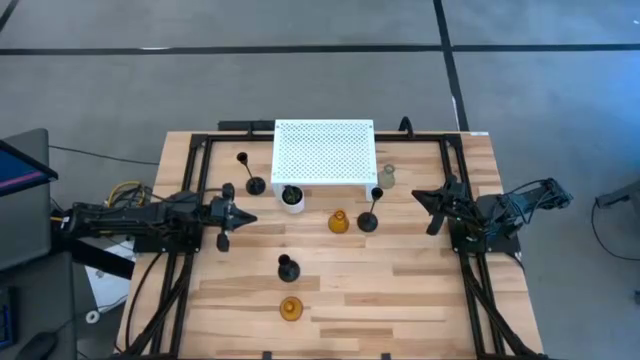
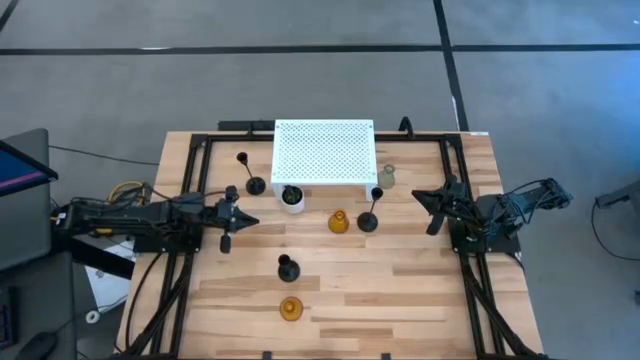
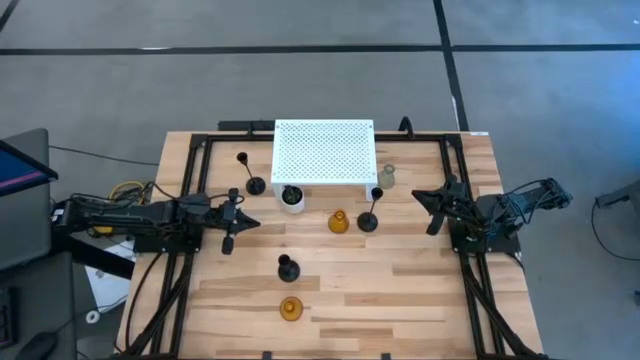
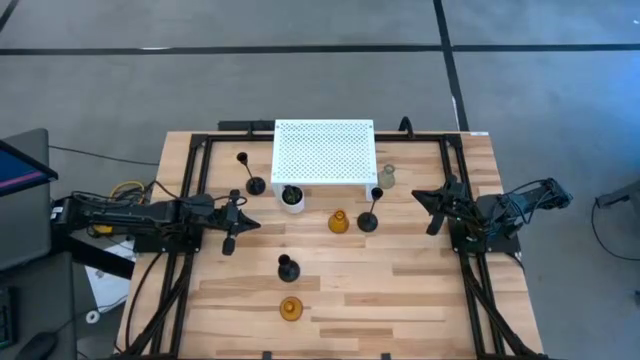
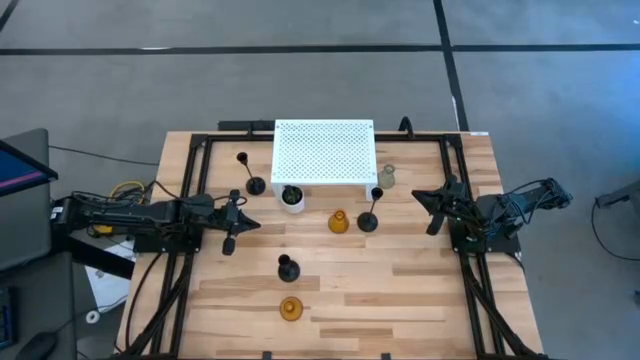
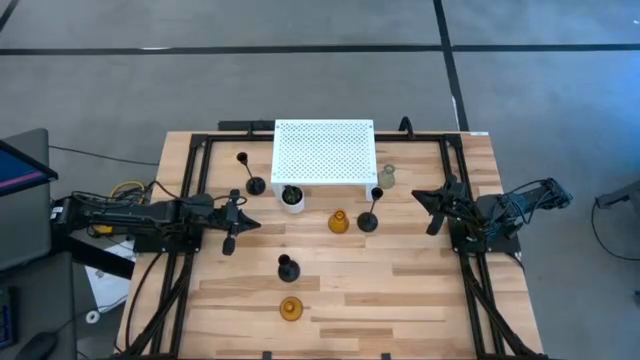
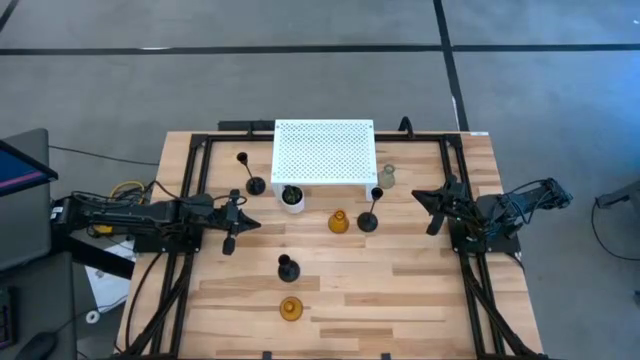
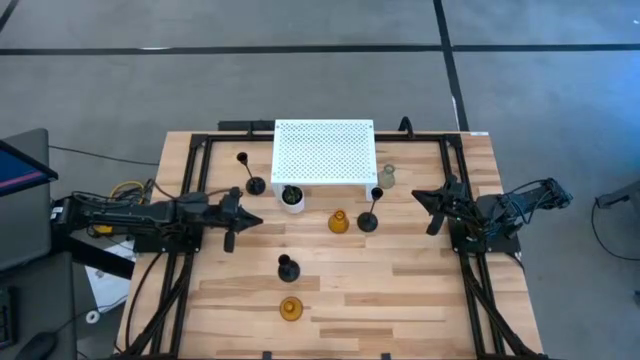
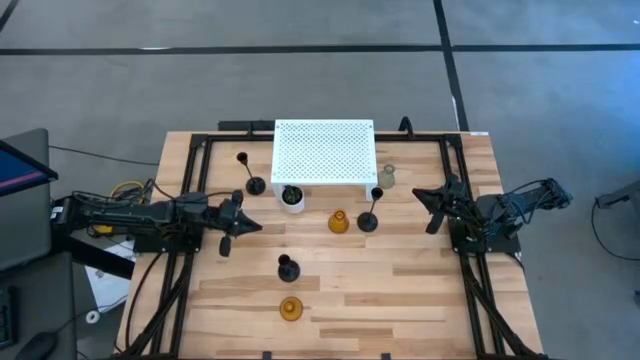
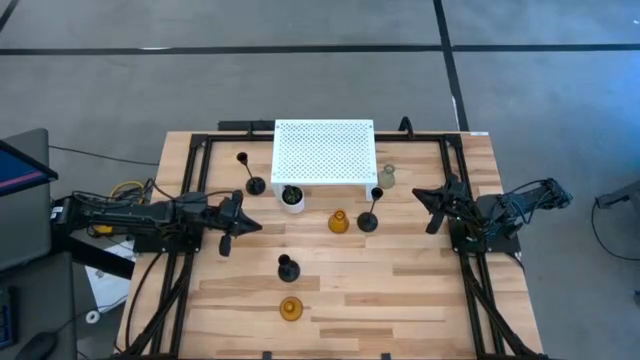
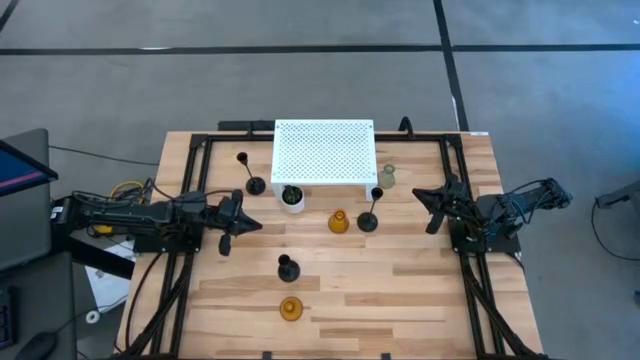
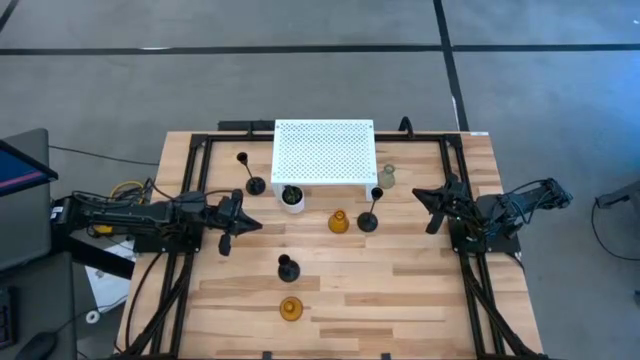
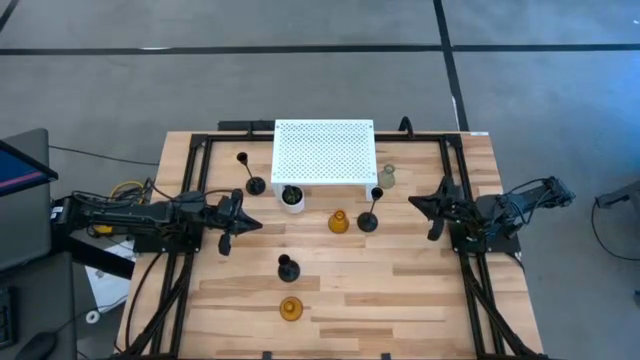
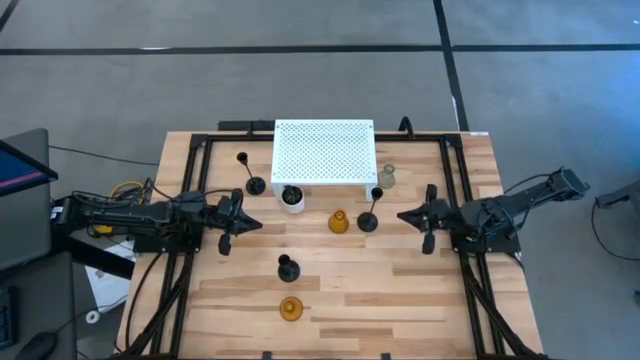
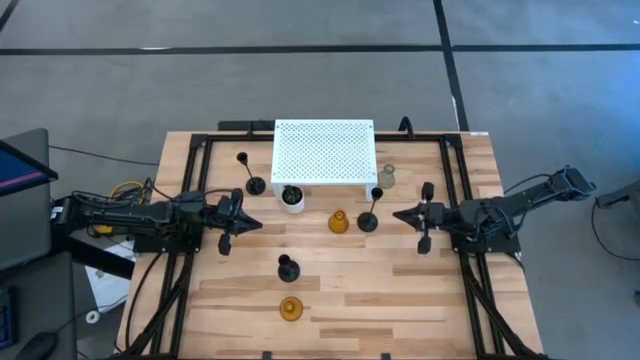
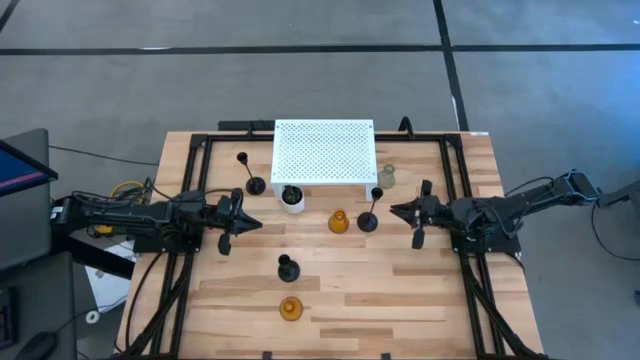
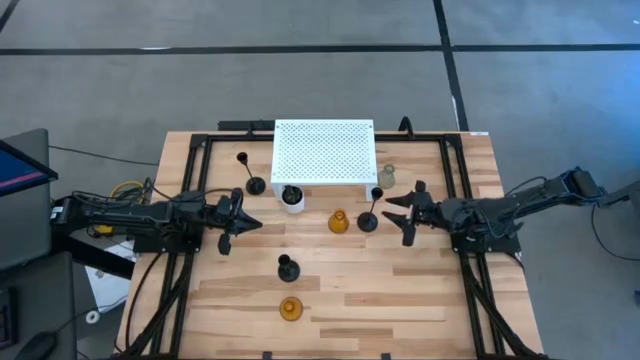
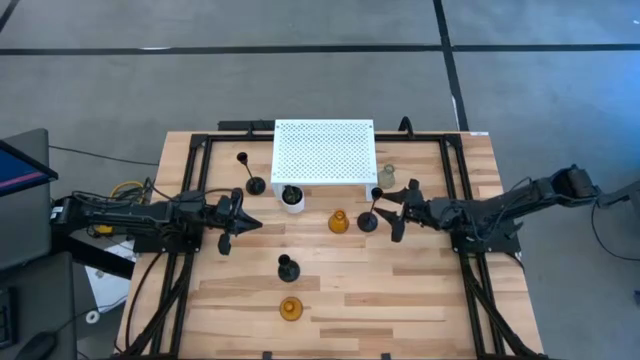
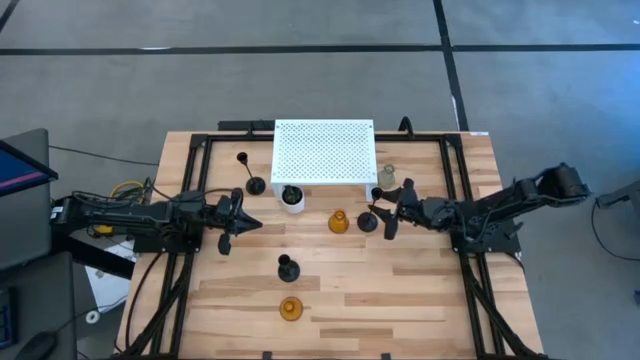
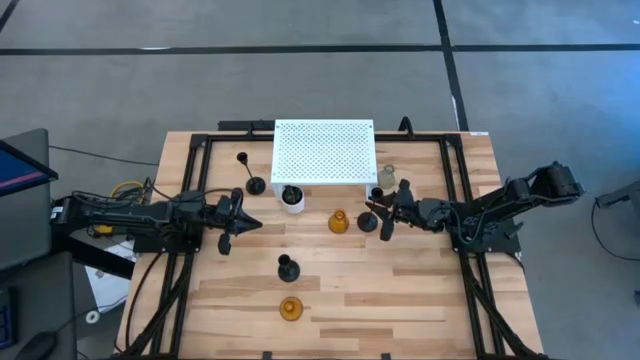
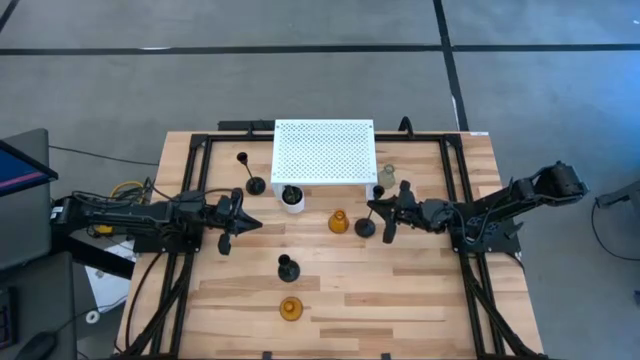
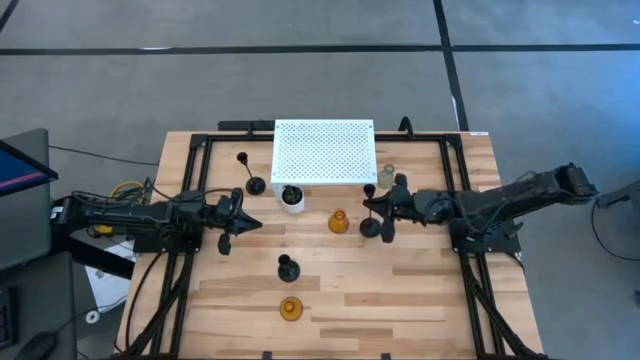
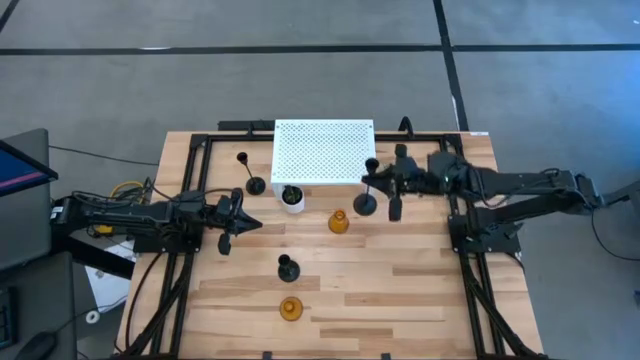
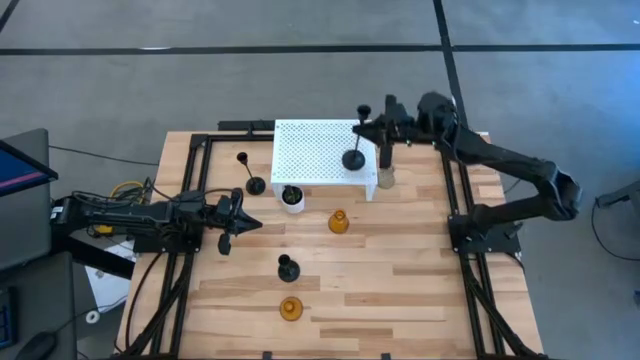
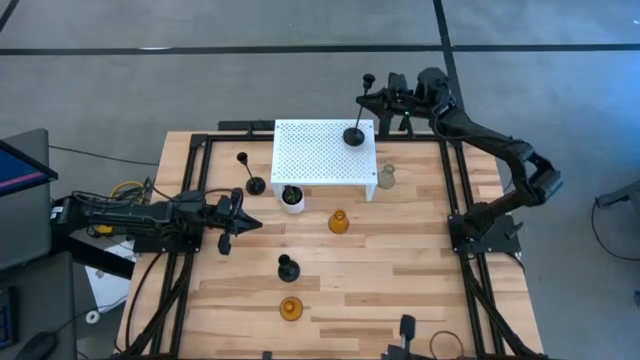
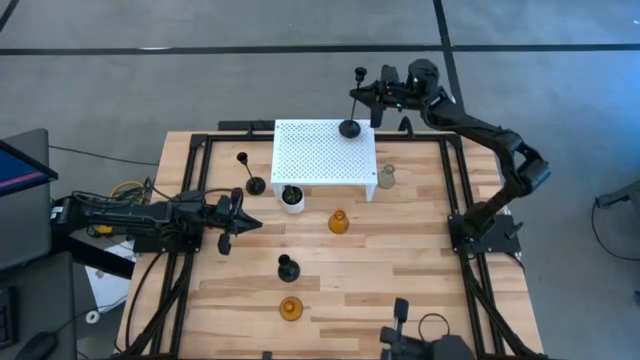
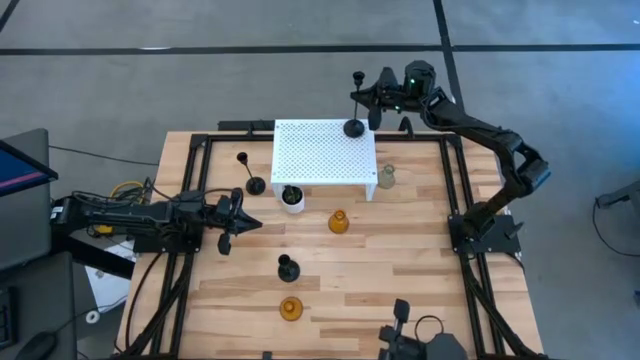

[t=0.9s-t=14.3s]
Task: Pick & Place candle stick holders
Put the top right black candle holder on the shelf
